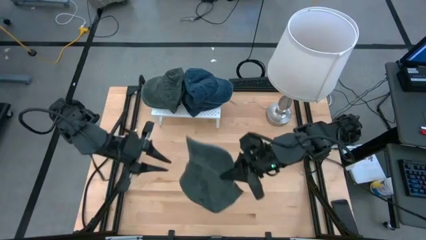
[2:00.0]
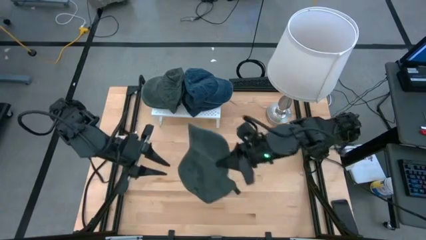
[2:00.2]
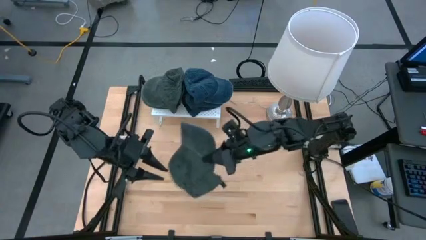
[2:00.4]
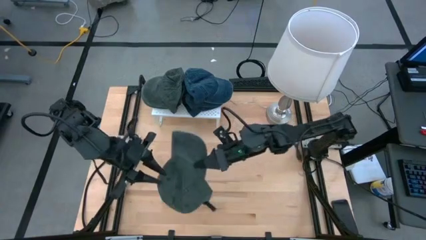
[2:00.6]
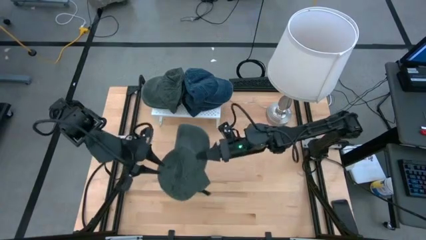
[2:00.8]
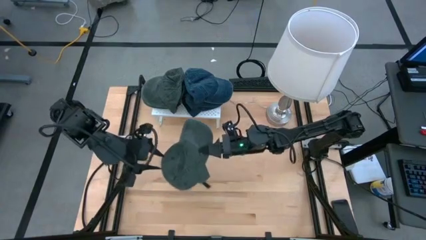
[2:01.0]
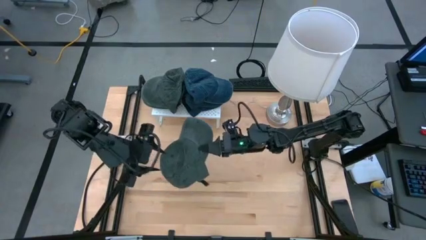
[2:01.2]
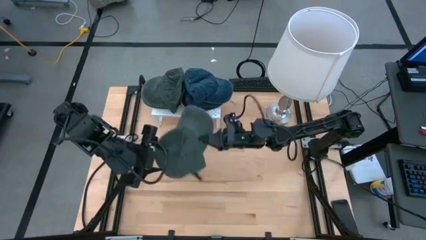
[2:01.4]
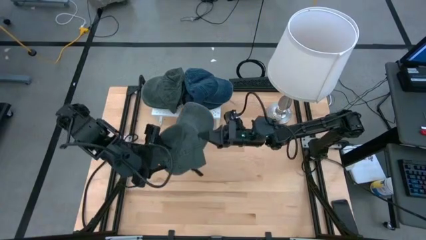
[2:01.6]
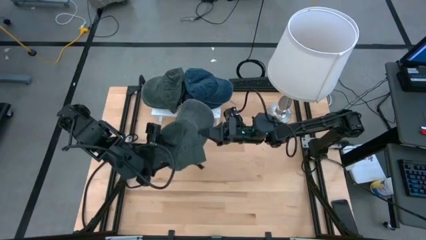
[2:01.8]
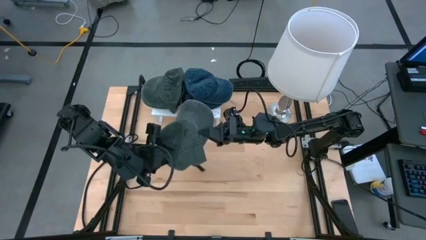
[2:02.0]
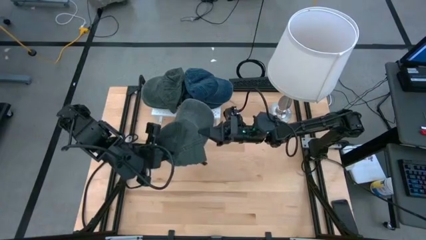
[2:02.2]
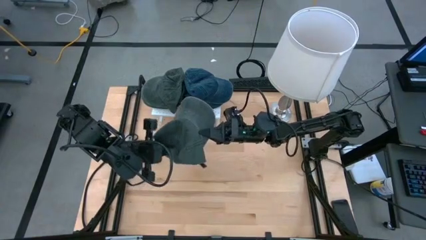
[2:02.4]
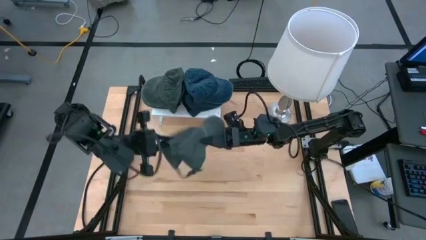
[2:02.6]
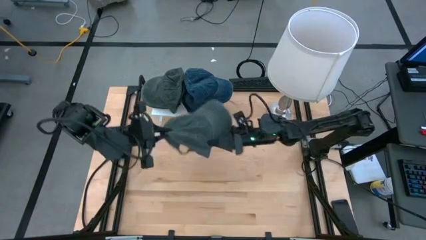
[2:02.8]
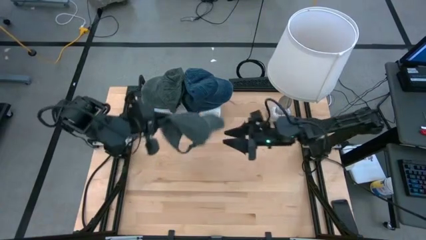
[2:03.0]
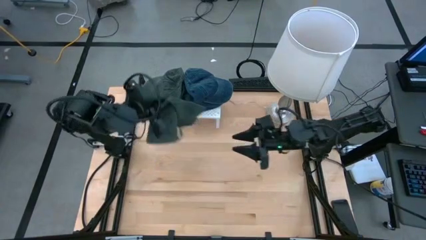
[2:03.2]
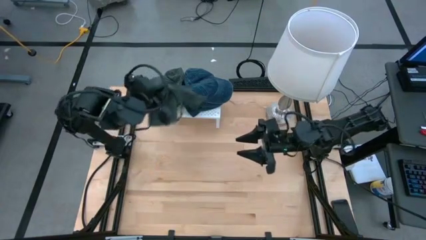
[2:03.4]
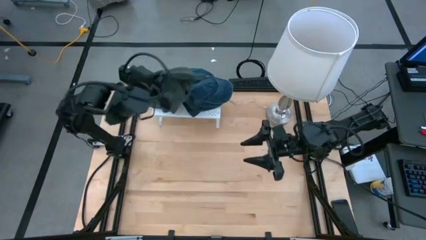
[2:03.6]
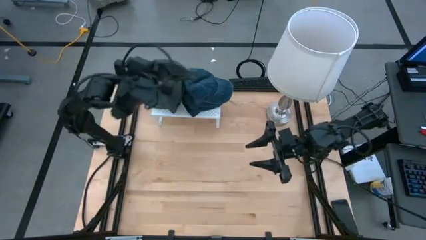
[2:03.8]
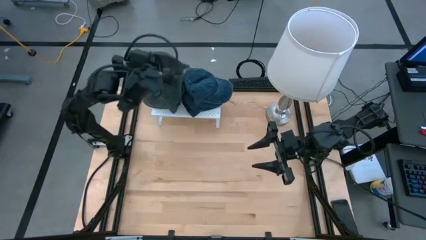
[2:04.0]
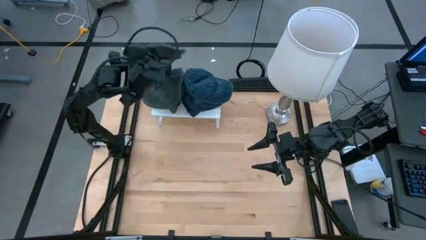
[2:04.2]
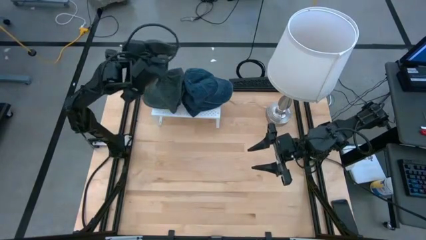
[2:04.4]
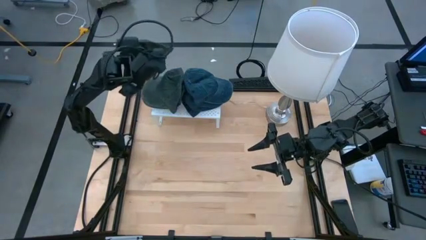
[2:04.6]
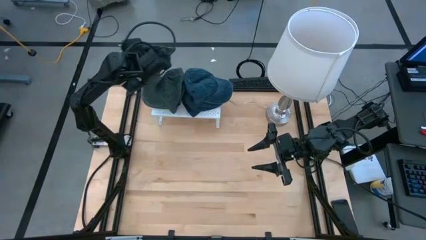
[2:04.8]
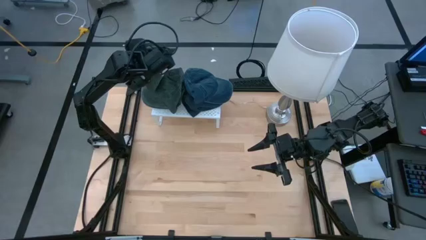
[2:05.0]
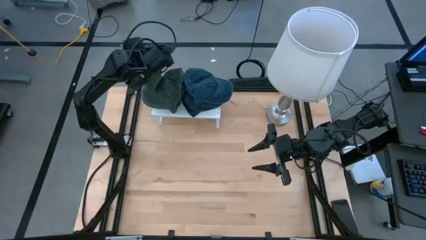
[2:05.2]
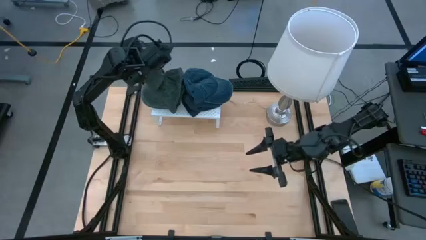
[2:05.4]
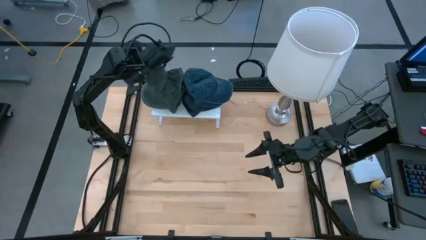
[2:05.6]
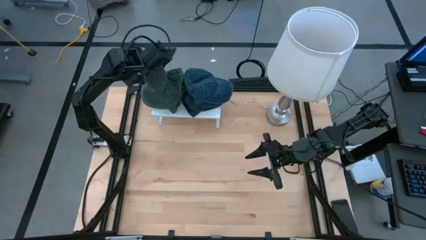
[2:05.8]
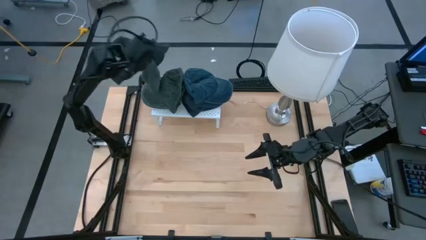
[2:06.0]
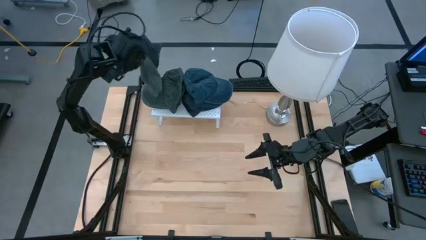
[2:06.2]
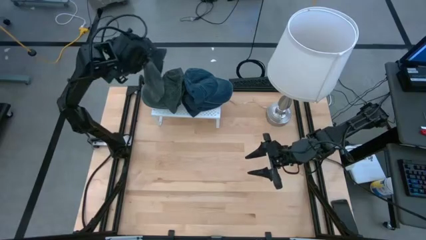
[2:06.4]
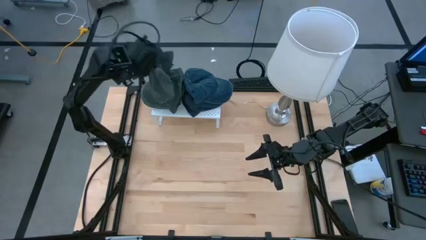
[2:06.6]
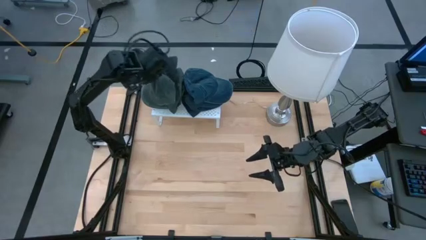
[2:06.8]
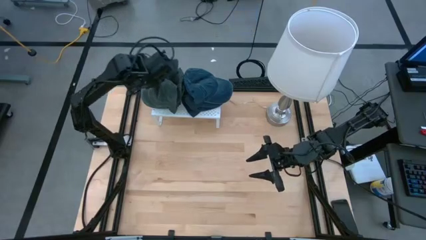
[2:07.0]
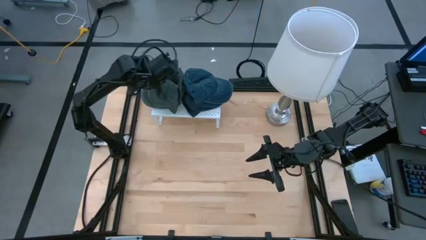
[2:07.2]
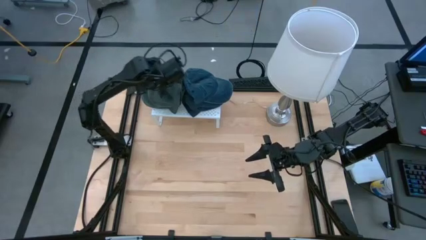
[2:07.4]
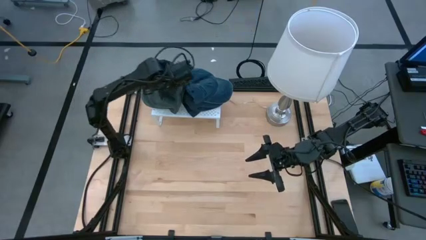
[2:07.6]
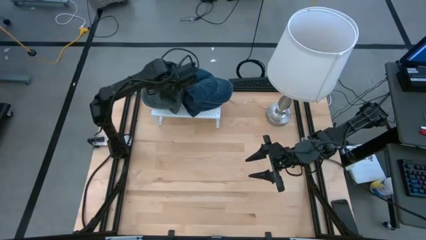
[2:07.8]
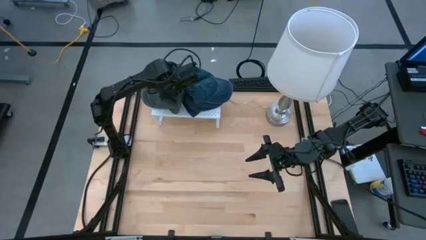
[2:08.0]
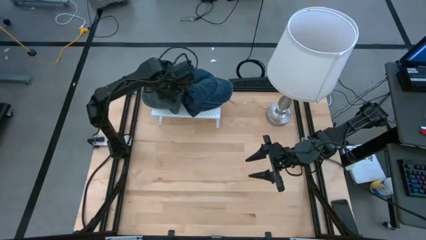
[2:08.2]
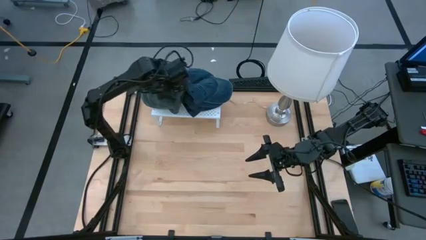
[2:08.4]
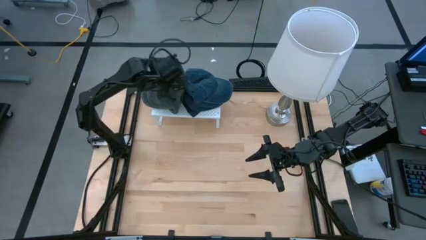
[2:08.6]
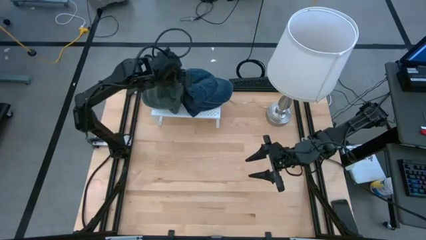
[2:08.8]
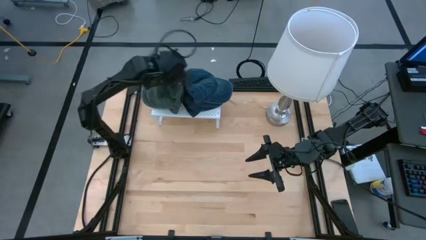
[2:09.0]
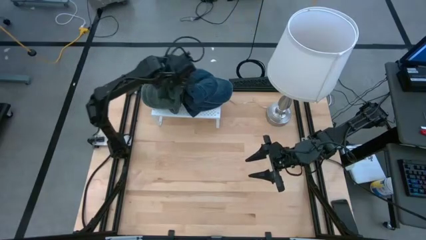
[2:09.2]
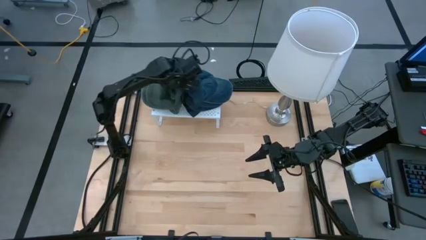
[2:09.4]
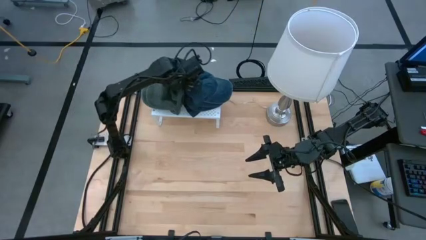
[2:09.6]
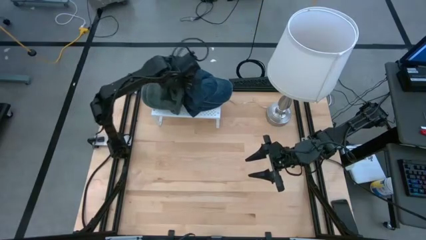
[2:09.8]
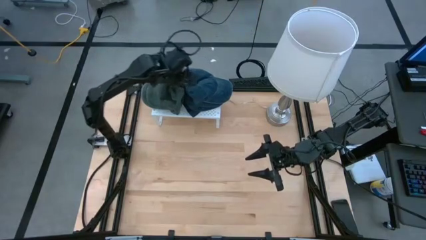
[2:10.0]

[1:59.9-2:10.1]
Task: Pick & Place hat
Stack the gray cap on the gray cap on the shelf

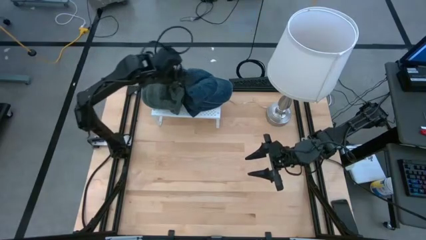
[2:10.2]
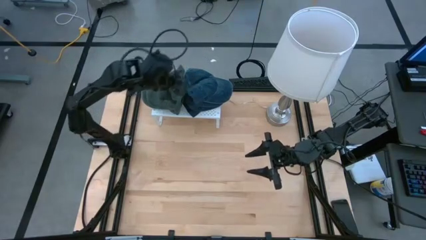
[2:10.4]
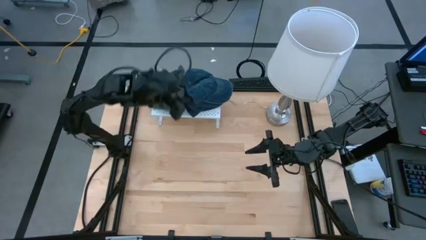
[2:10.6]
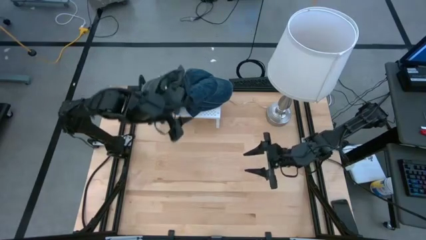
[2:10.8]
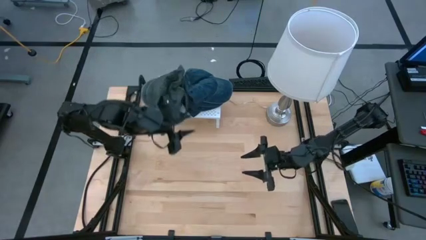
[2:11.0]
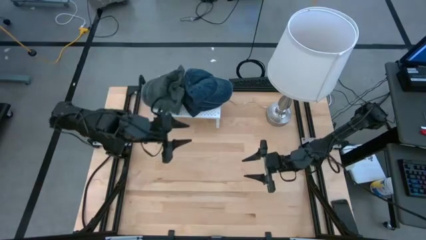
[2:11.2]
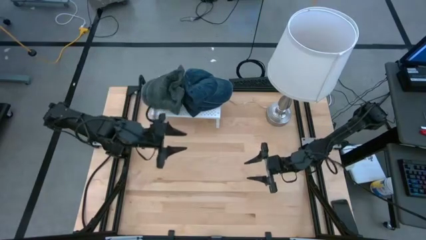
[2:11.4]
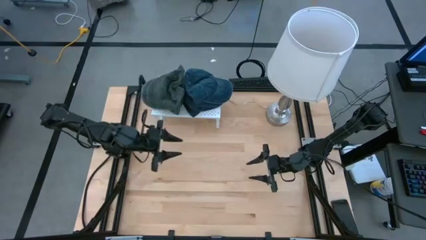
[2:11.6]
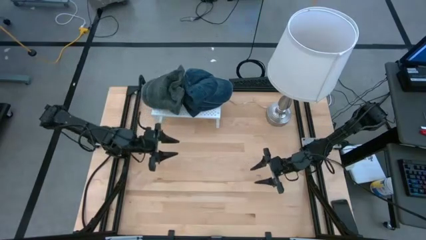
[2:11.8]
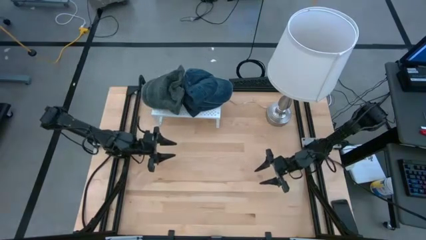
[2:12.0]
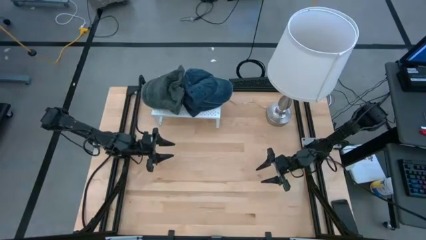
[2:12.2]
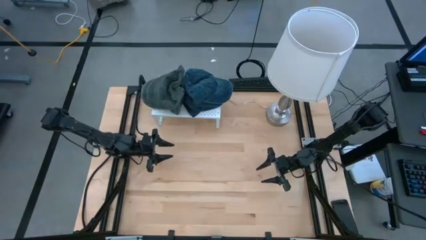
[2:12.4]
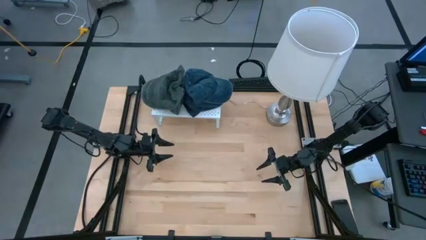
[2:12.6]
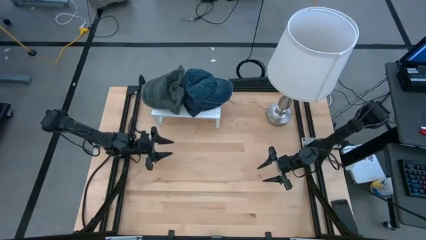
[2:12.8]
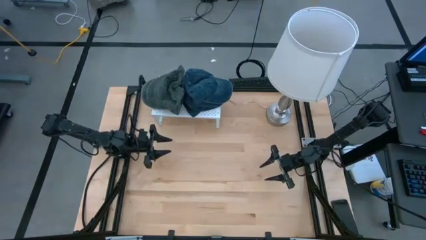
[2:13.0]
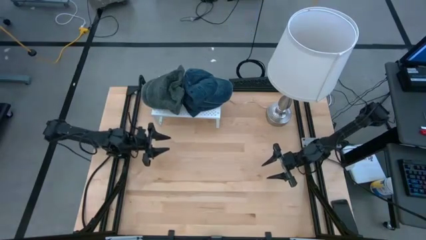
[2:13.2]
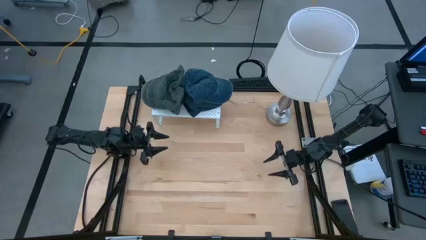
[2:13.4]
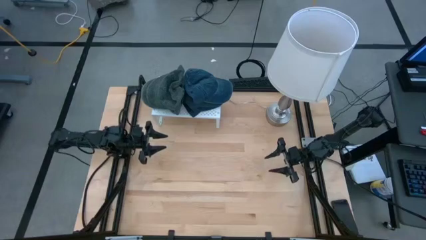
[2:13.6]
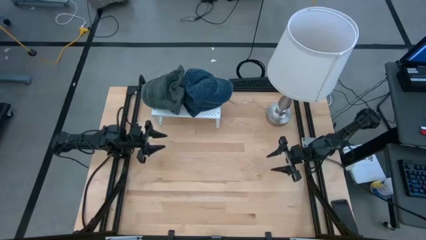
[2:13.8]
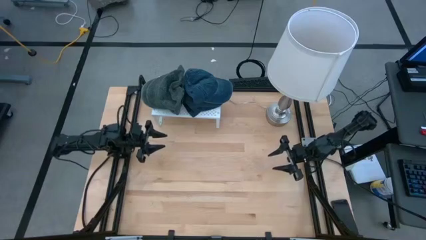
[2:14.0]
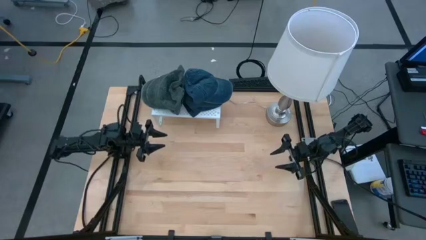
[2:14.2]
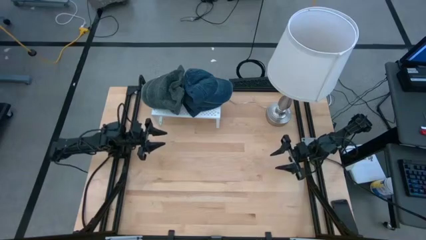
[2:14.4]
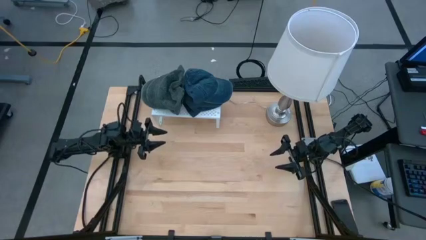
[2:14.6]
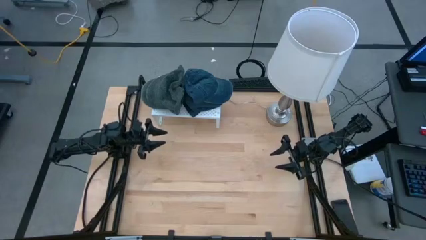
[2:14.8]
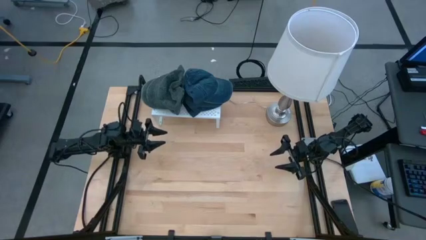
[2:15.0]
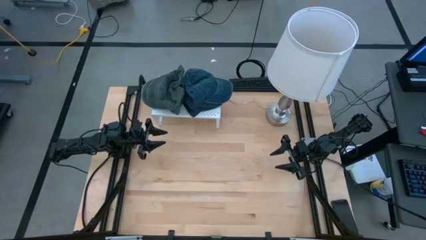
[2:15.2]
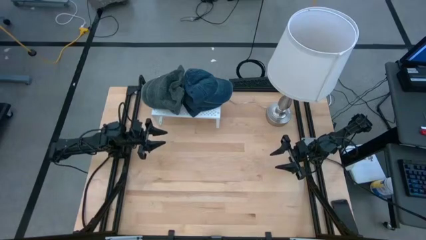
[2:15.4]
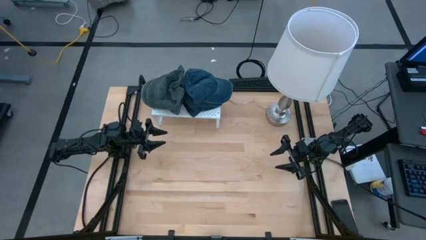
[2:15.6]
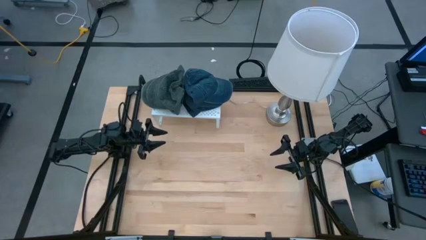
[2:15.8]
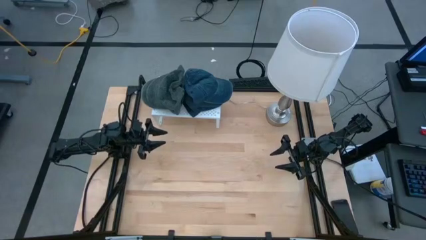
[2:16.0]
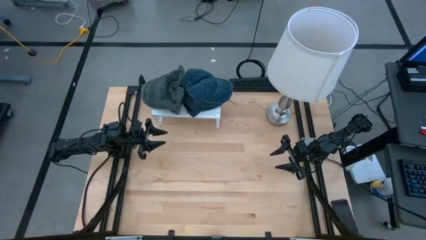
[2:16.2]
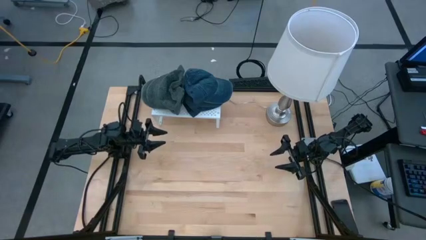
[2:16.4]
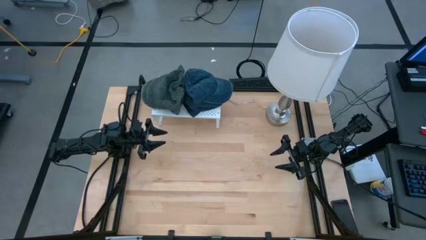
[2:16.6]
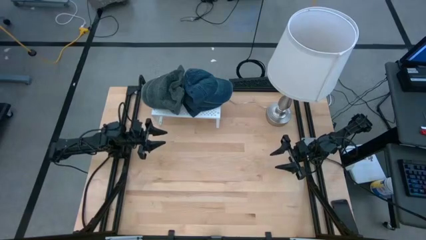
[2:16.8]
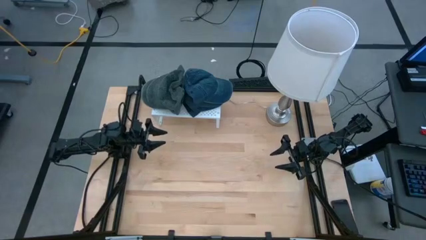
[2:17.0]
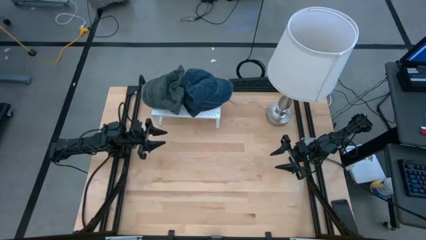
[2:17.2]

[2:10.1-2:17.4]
Return to Home Position
